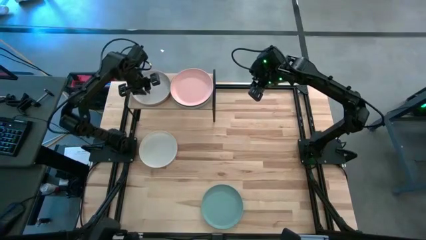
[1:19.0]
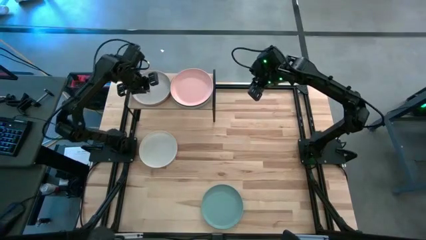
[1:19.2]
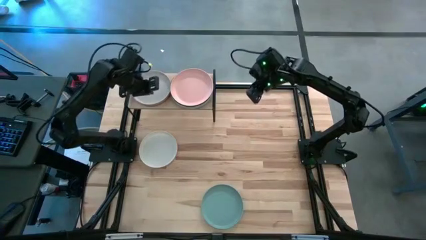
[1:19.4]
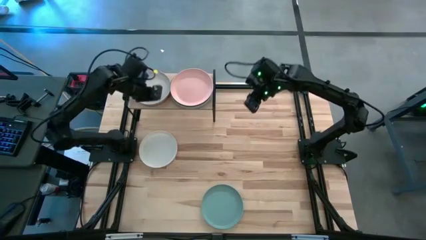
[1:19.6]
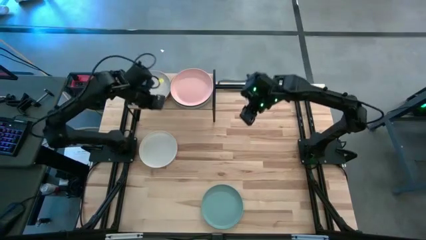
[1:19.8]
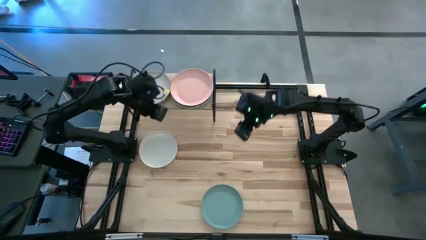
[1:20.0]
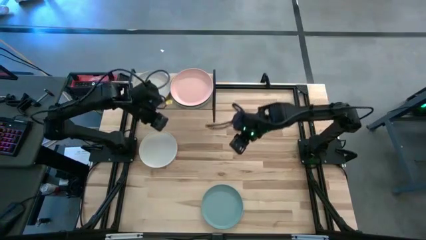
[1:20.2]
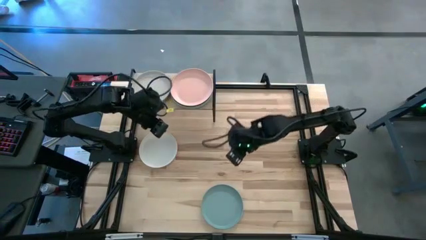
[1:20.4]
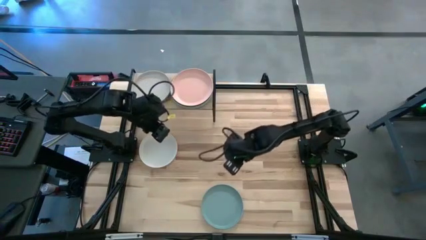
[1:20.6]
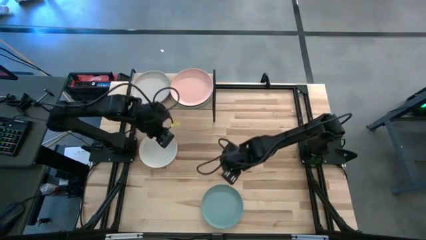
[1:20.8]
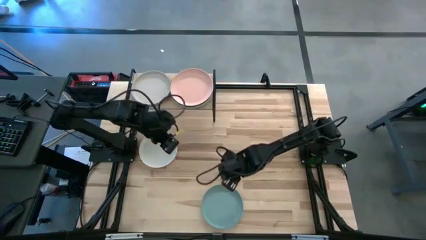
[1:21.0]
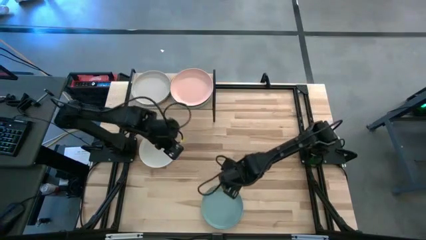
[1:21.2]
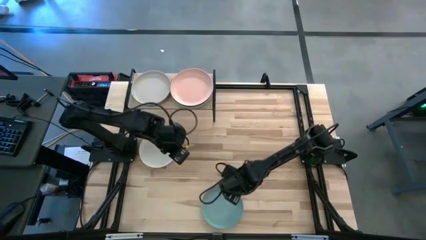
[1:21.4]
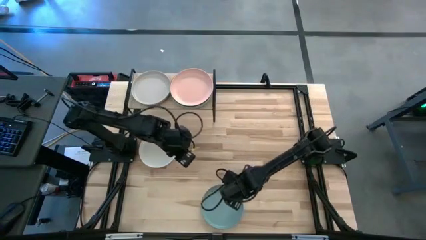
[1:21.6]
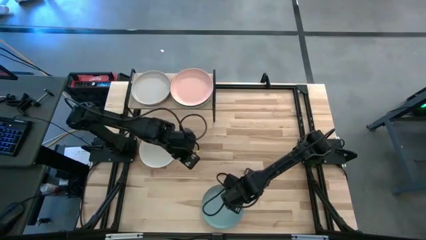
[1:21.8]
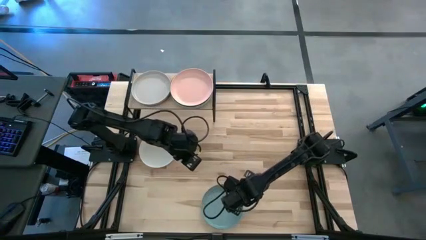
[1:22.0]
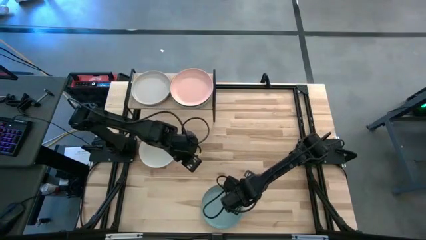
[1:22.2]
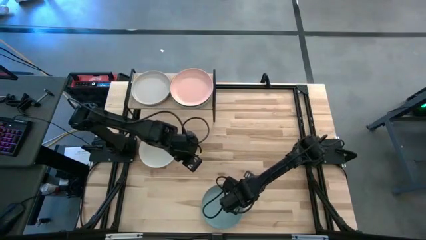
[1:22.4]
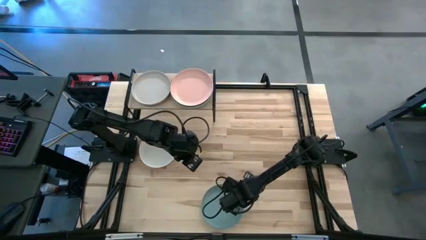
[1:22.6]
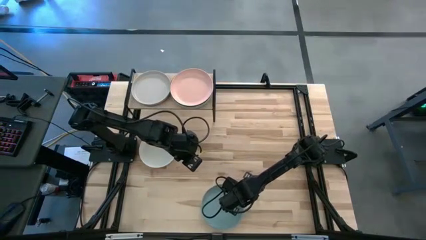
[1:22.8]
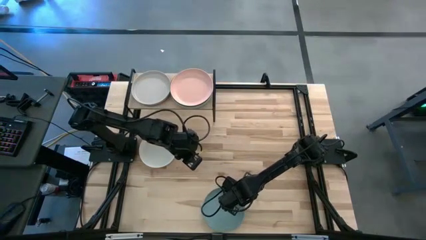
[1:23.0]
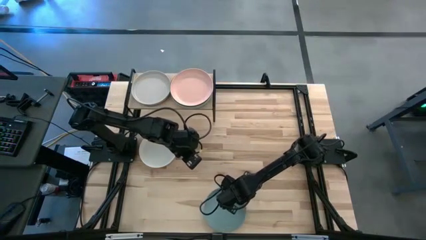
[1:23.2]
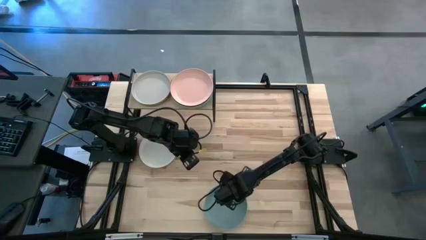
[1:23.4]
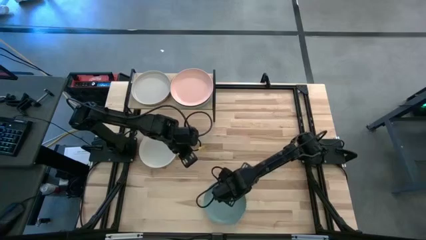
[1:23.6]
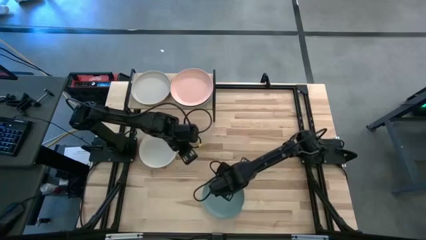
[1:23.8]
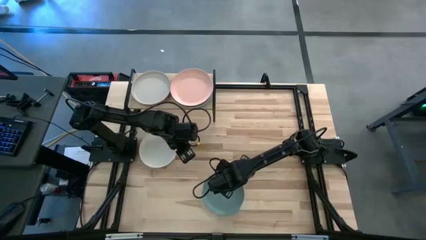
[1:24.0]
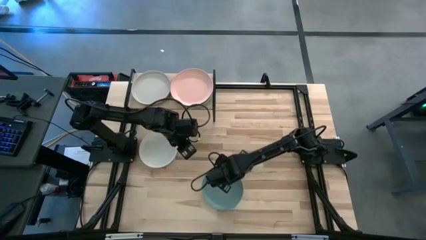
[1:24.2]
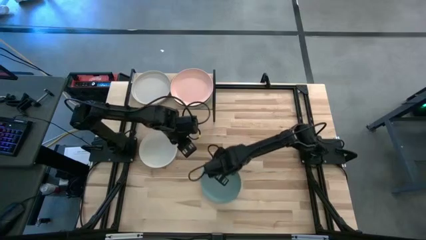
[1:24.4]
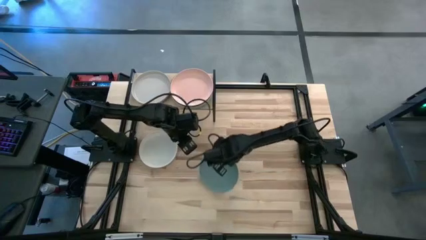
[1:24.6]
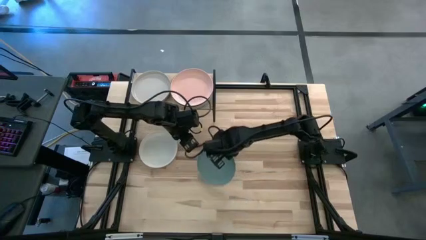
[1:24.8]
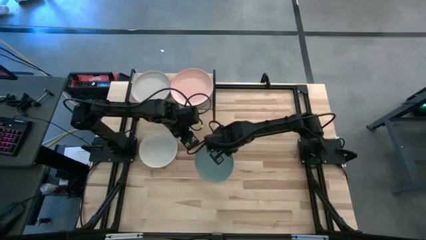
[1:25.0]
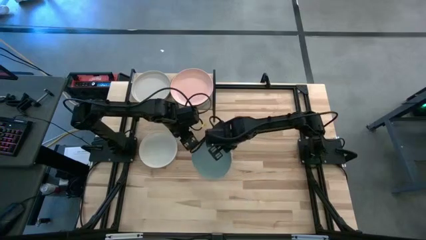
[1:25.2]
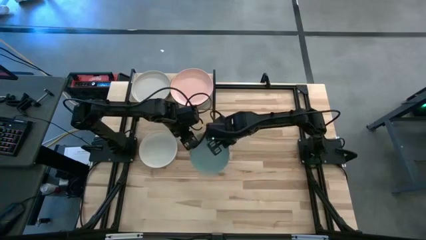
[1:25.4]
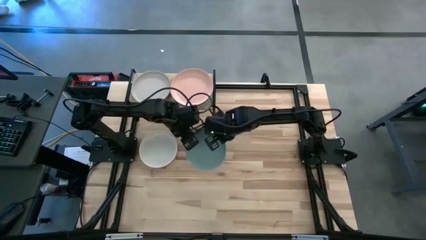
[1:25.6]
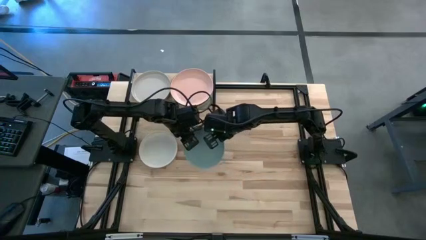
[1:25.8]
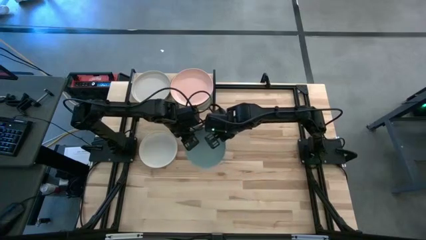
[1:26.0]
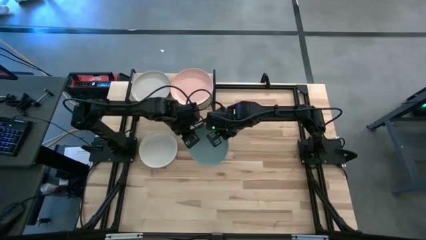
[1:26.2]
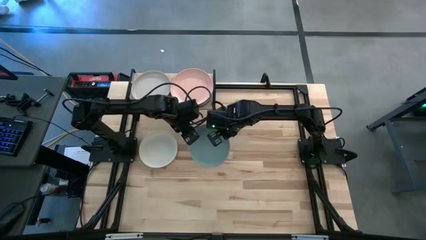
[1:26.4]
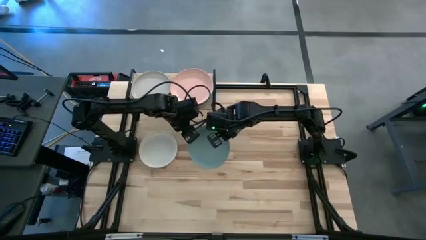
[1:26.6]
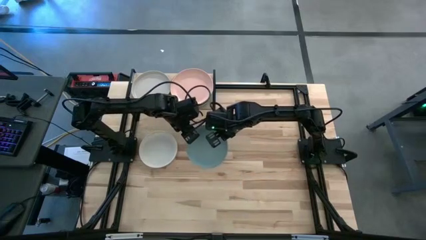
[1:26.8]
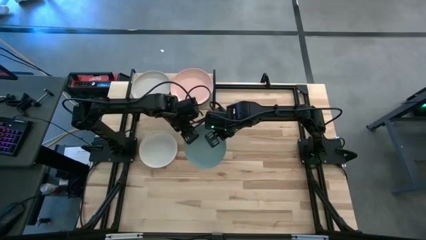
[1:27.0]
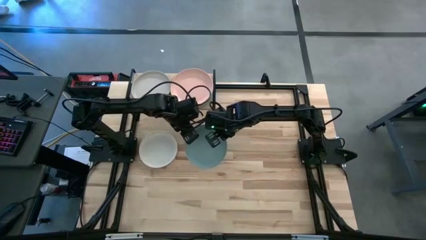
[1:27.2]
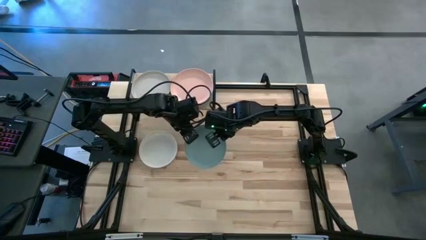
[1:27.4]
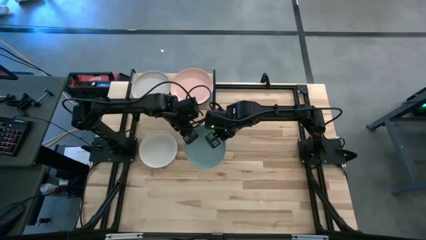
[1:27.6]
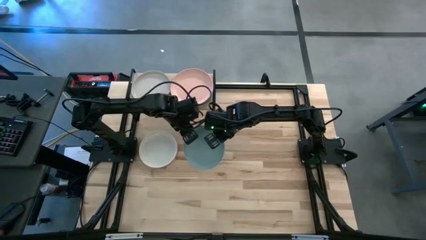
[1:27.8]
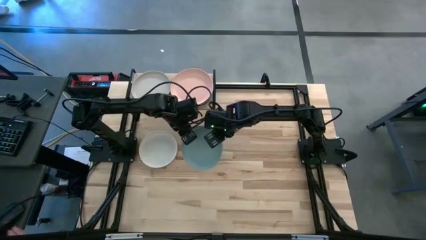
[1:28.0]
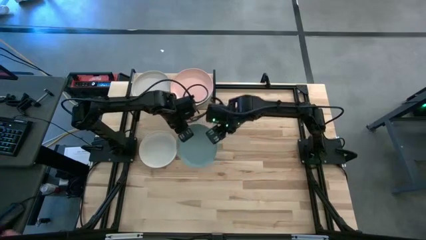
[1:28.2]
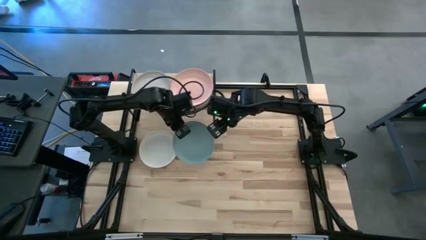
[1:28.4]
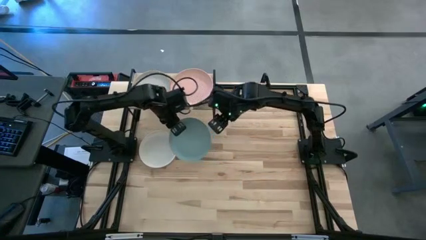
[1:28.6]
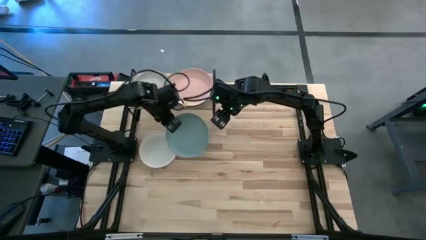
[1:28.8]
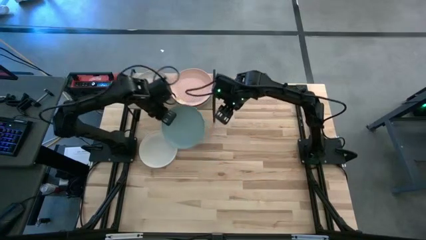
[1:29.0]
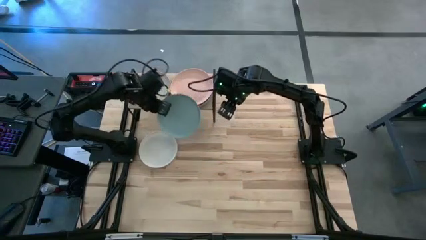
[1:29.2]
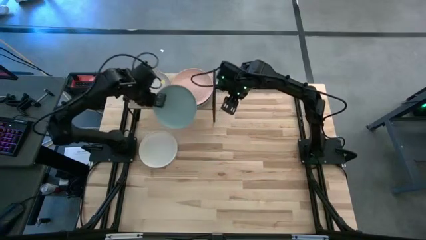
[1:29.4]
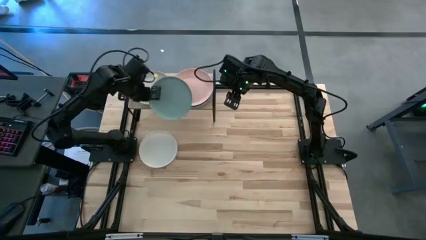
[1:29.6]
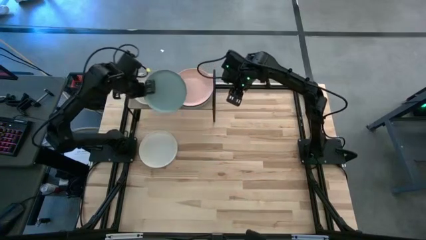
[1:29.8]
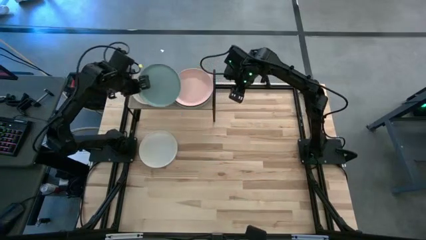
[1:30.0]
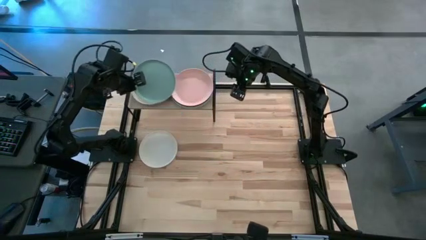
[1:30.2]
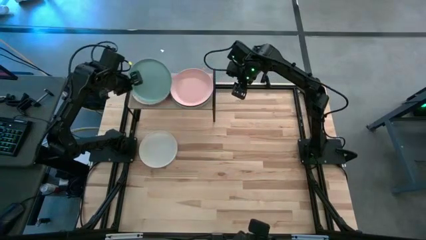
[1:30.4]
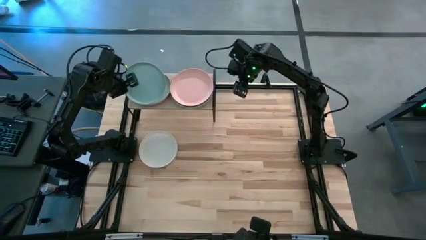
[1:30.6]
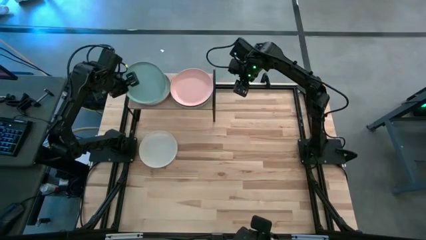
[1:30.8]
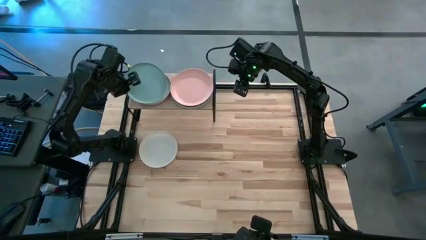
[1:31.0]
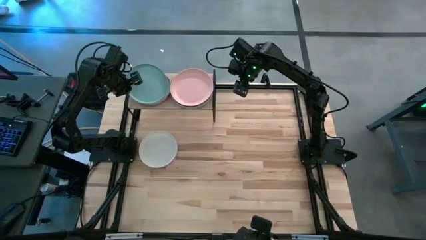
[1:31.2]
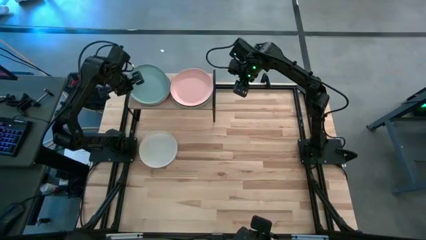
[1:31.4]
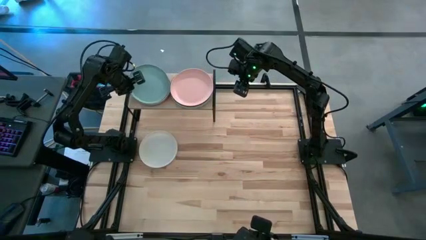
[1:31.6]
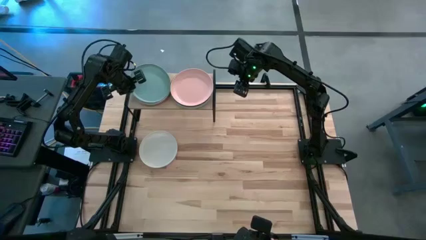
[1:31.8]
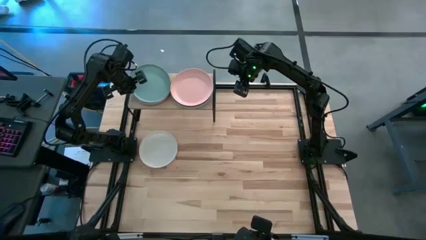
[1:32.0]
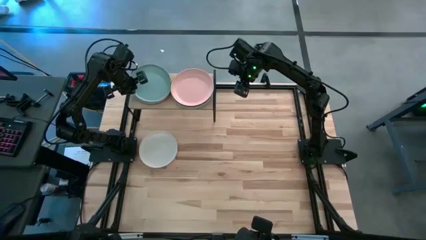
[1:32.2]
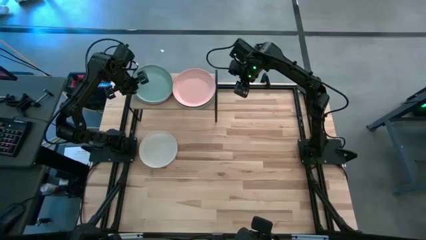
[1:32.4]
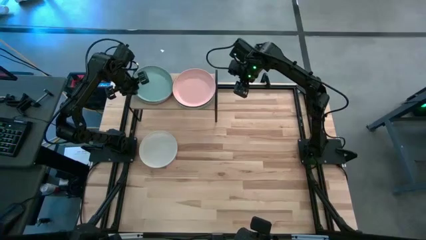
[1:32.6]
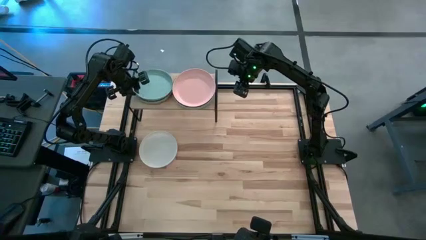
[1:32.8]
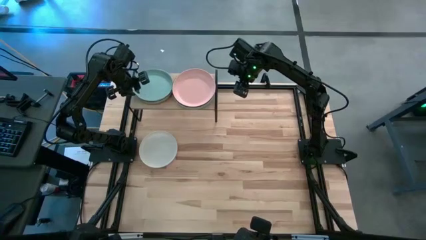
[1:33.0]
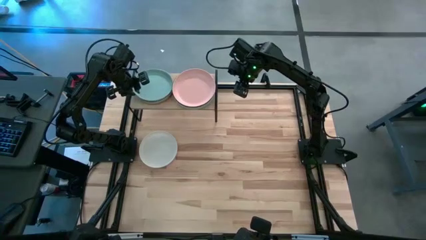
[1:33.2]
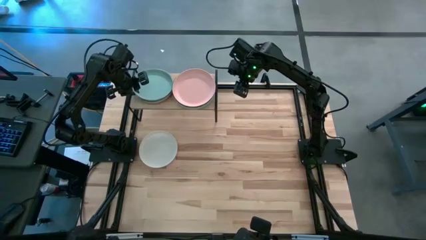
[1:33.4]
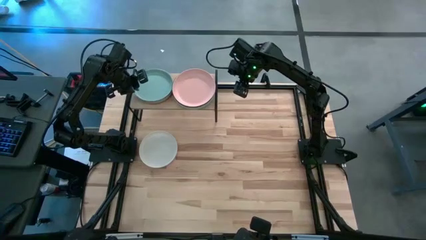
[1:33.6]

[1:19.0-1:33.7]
Task: Place and stack plates onto a shelf
Stack the blue plate on top of the gray plate on the shelf

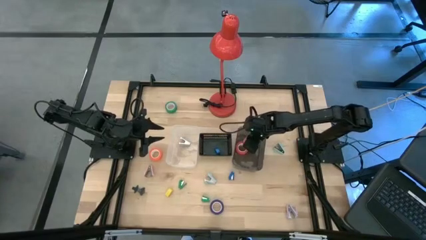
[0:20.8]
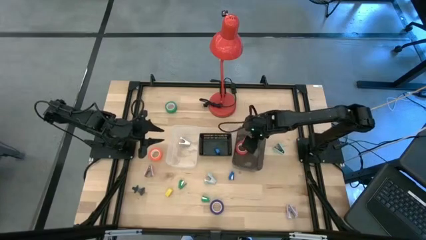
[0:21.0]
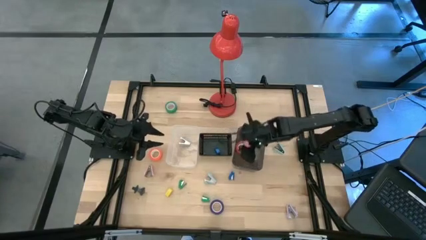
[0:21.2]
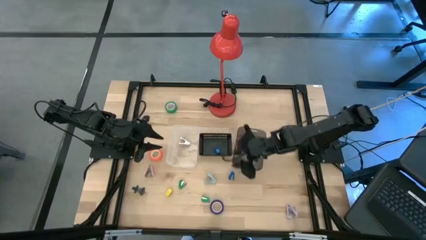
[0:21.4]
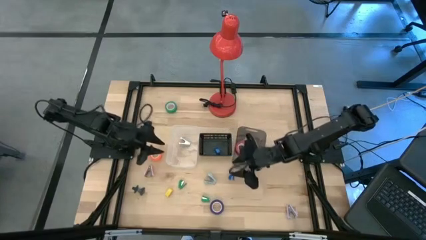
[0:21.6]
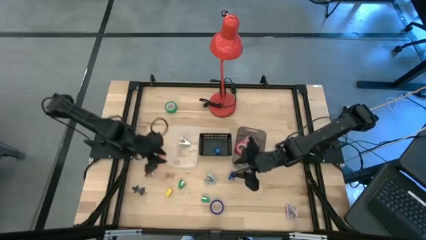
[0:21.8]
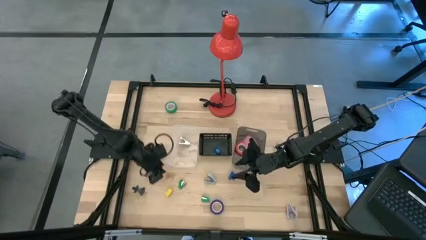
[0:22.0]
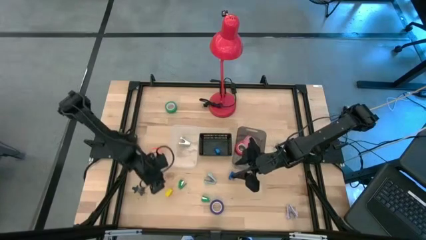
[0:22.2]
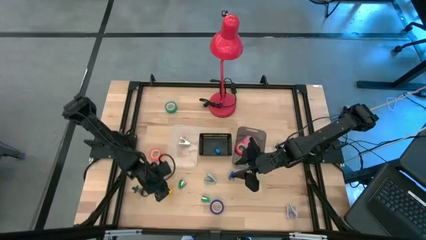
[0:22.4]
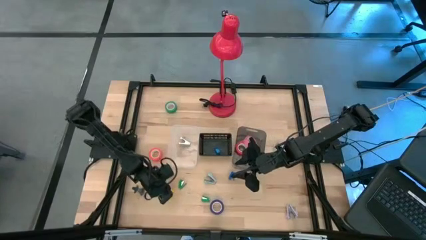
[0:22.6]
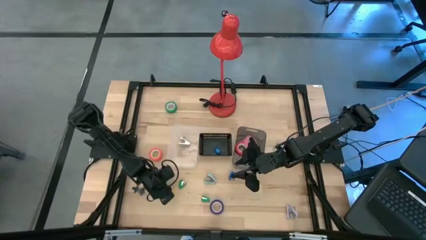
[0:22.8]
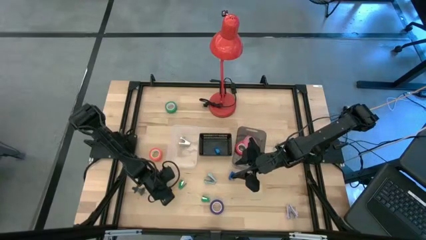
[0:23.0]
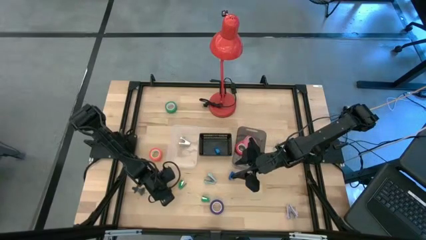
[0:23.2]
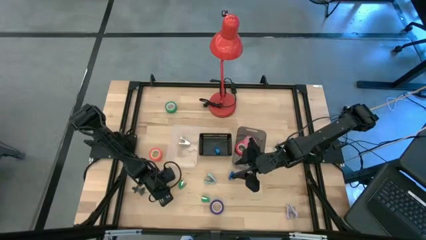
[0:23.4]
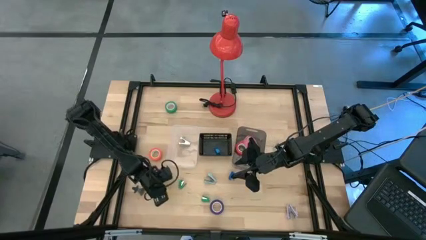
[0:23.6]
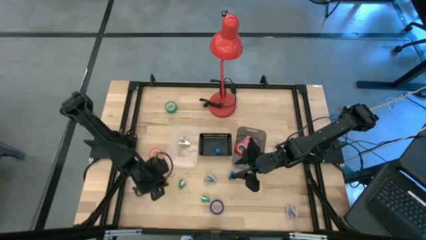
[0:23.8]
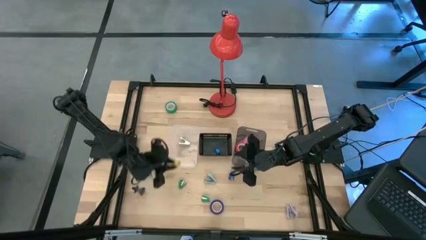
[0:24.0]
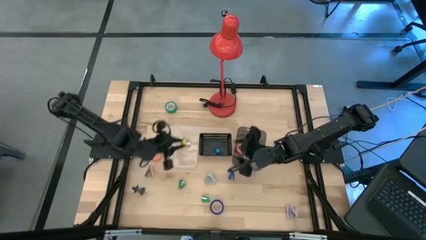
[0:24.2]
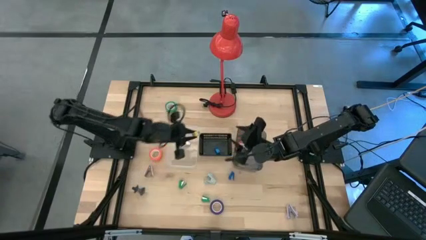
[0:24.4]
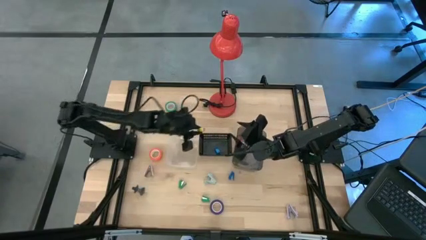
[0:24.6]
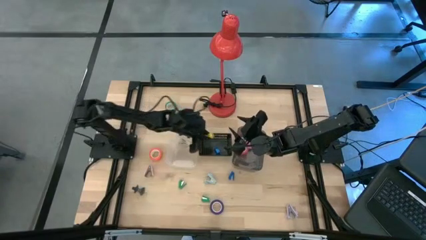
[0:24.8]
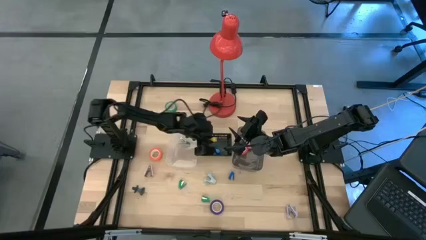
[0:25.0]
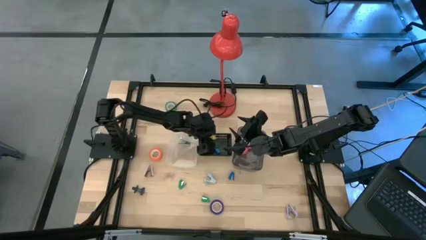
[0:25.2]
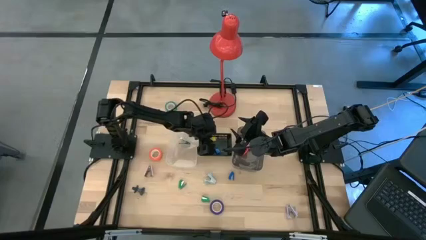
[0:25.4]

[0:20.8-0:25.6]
Task: Pick and place Stapler, Stapler remover, tape
Put the yellow stapler into the black basket
